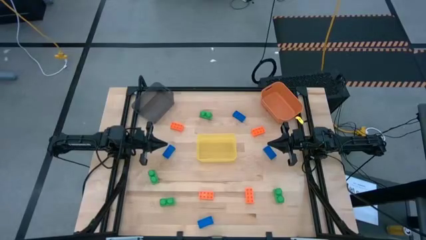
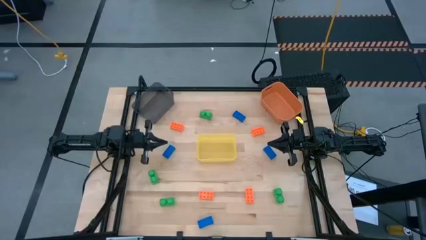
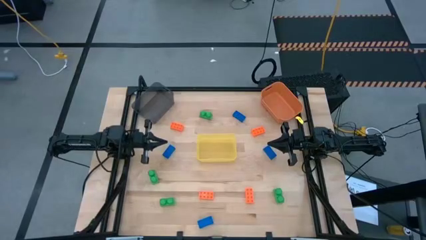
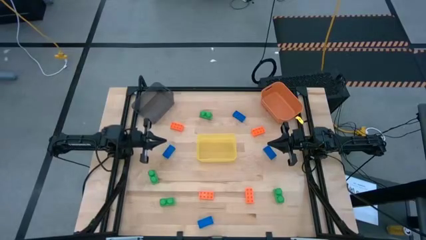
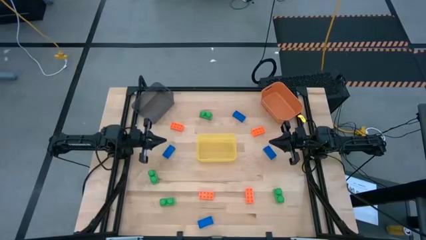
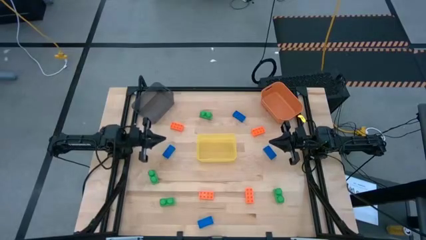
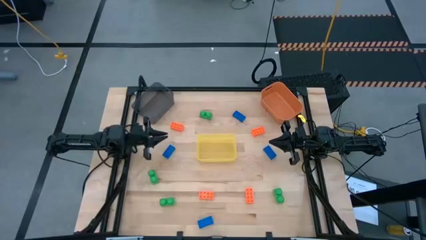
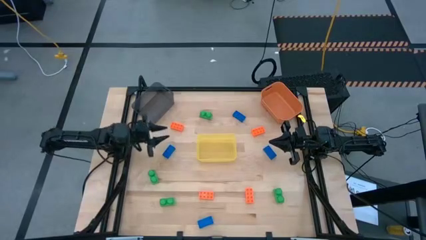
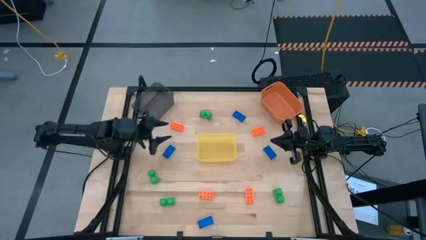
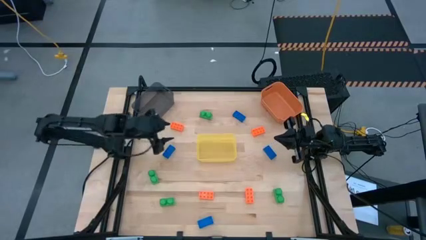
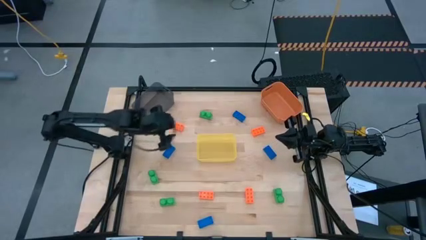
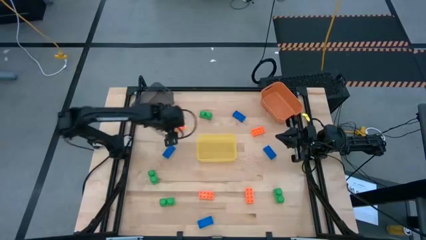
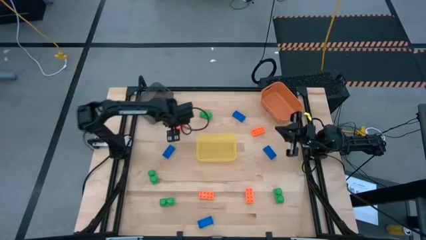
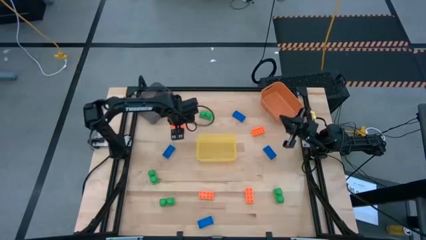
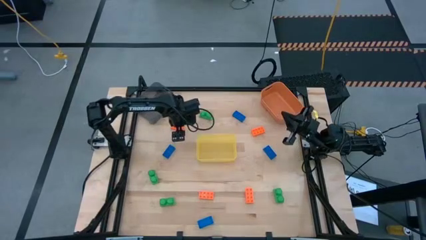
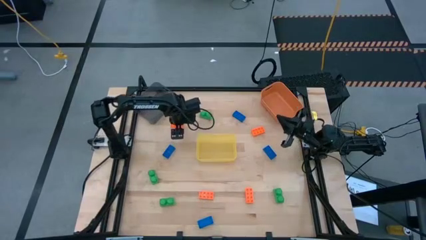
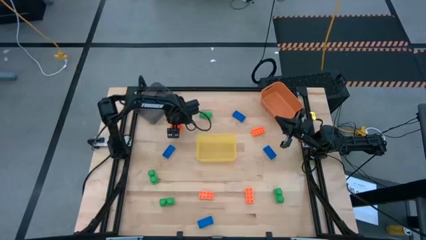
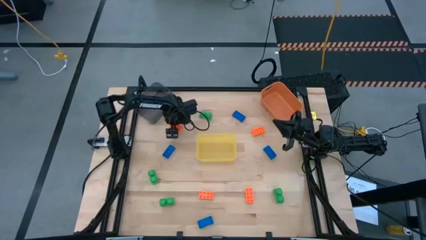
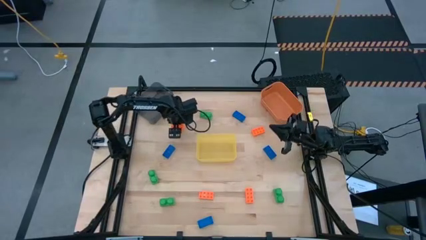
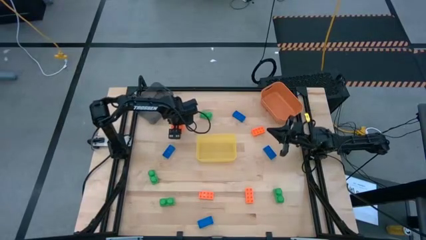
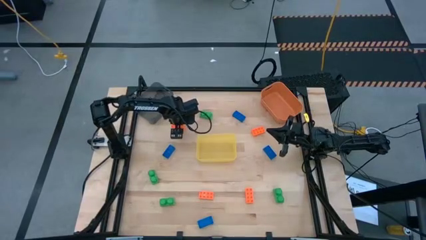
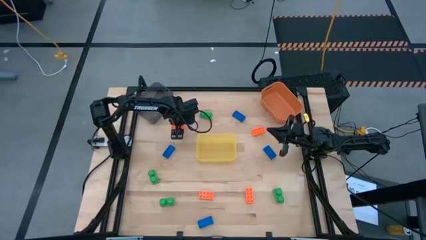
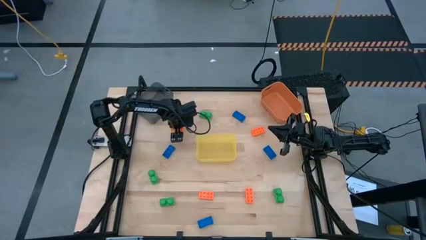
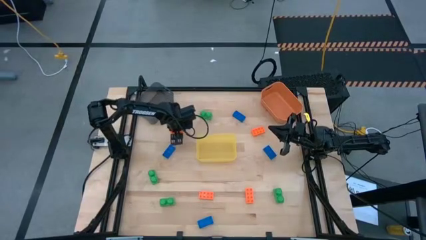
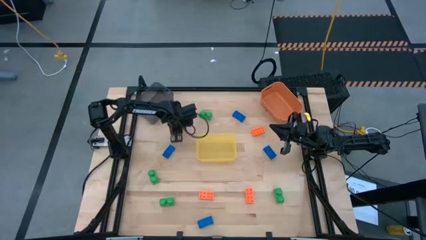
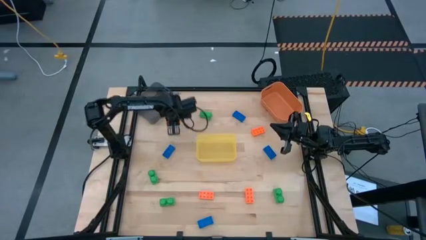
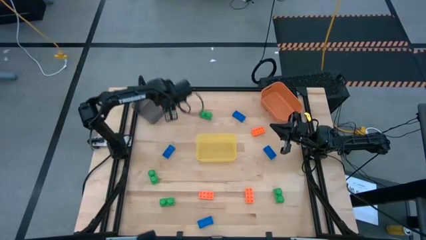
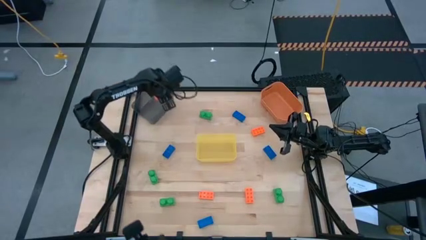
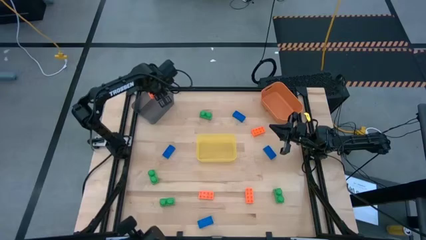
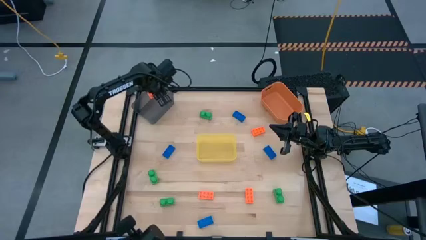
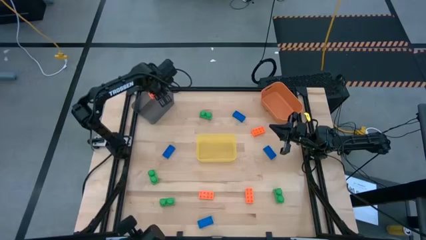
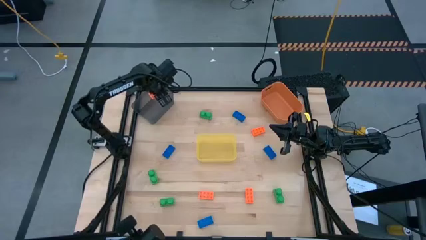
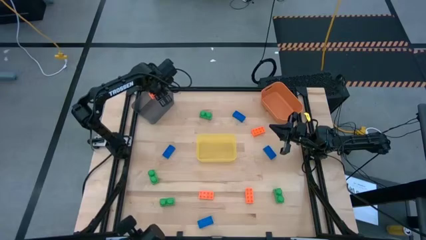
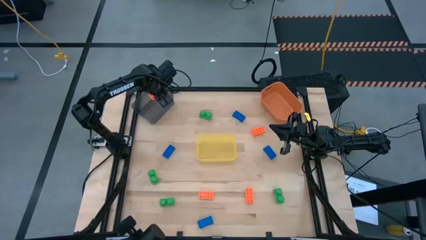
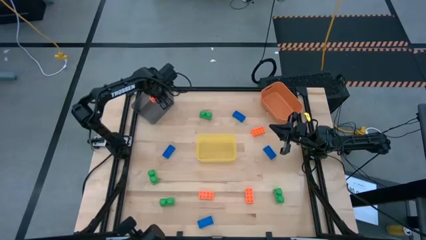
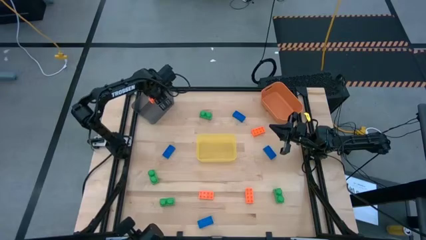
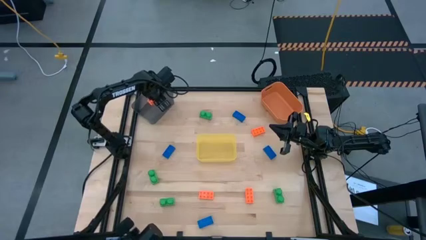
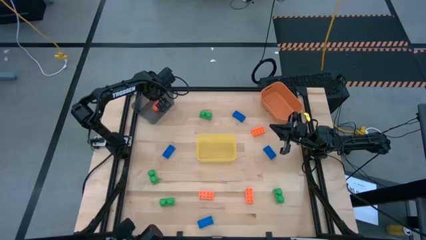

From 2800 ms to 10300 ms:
Task: Sort & place blocks by color
Put the orange game piece into the black bin

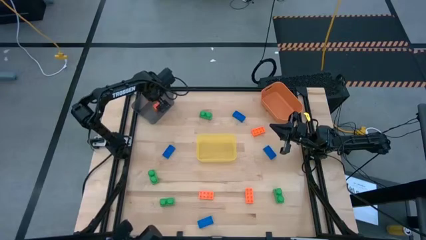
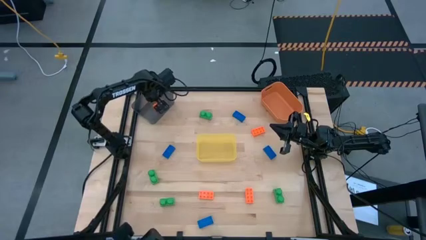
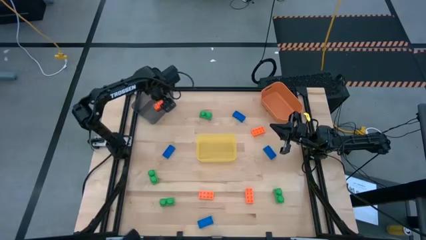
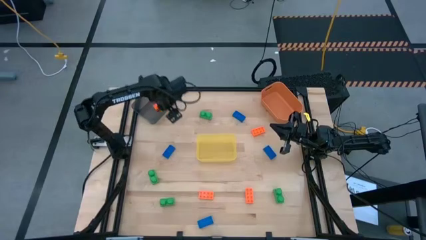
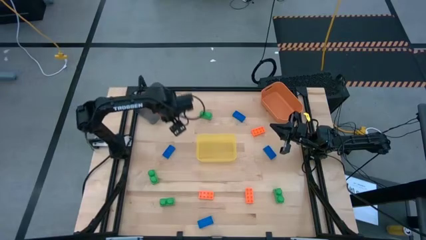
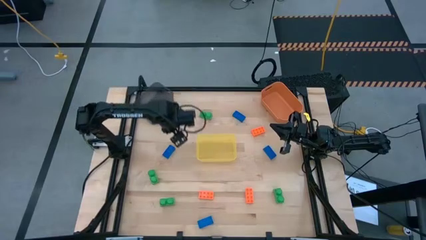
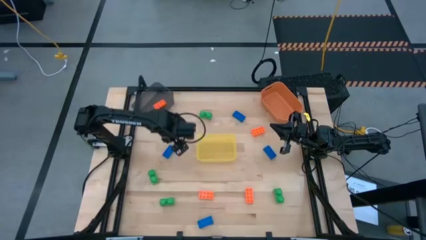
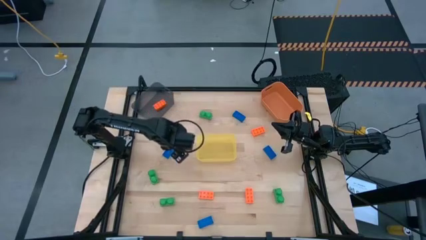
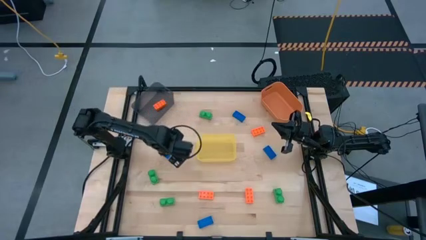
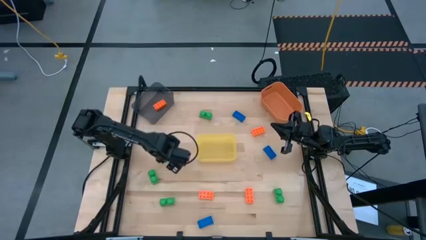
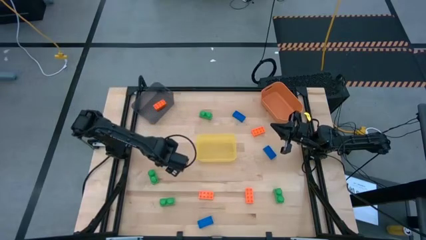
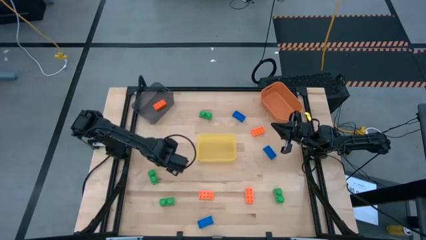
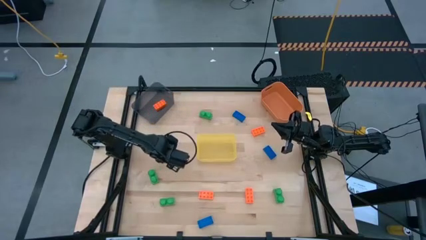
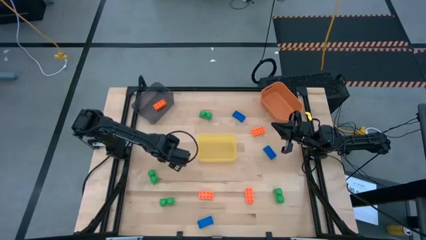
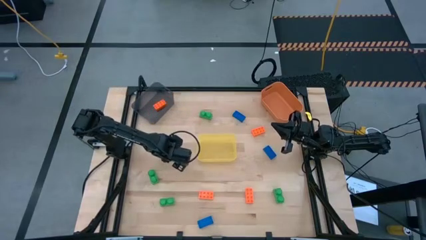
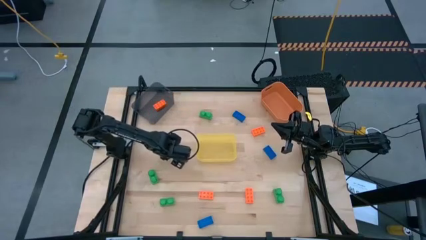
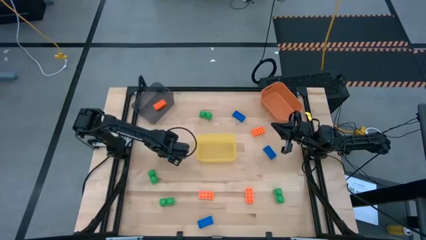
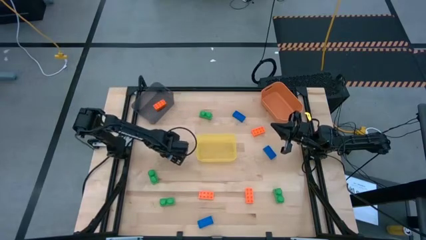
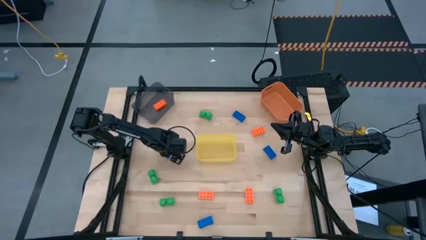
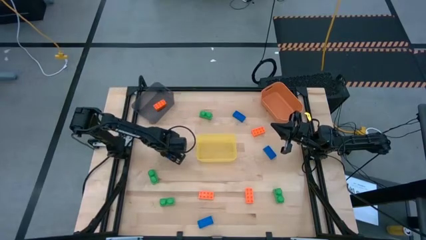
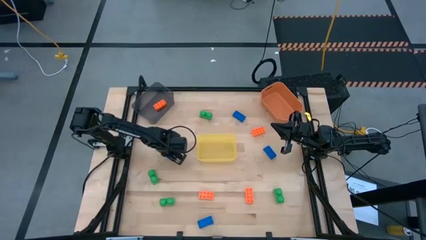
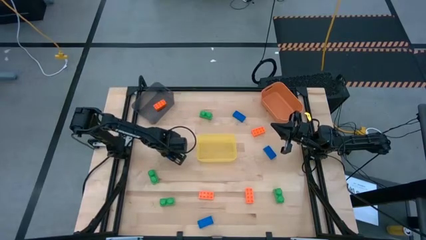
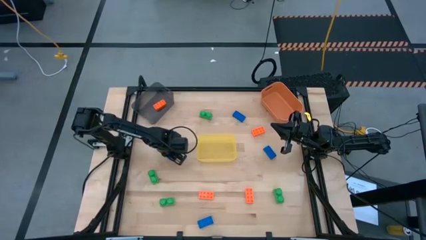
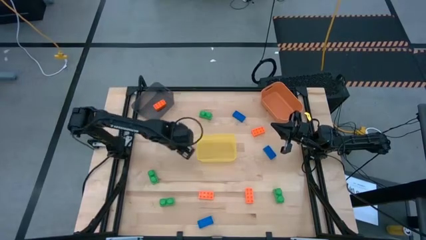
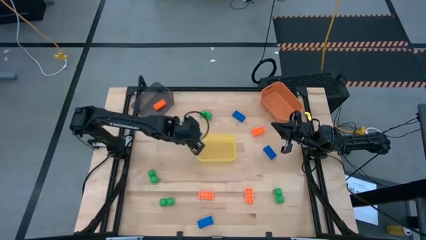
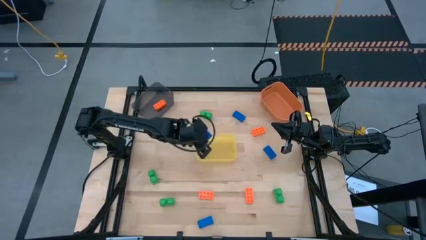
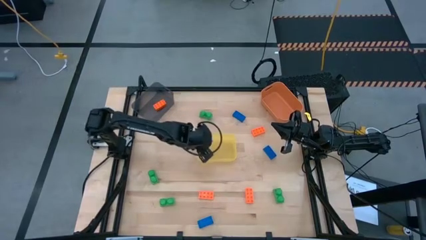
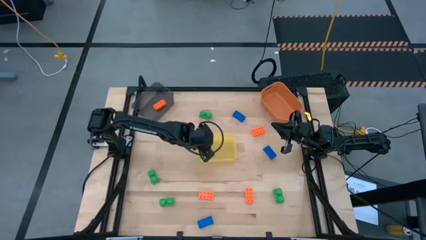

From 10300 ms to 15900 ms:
Put the blue game piece into the yellow bin

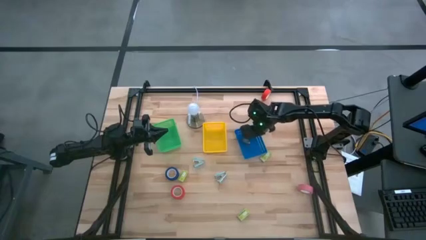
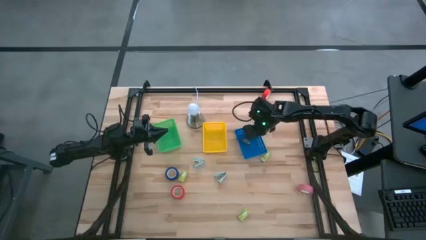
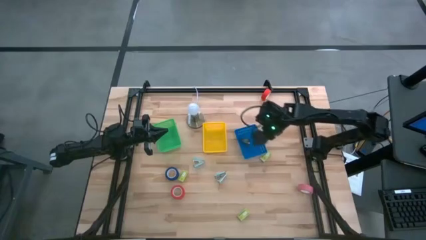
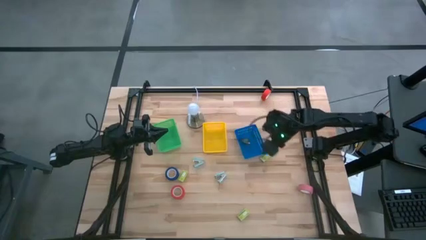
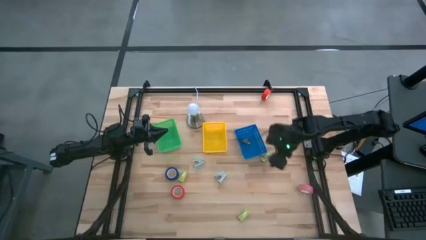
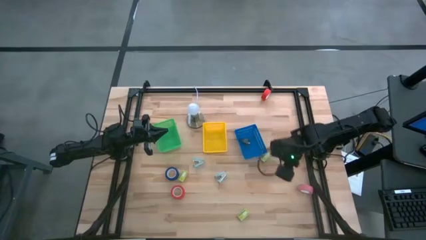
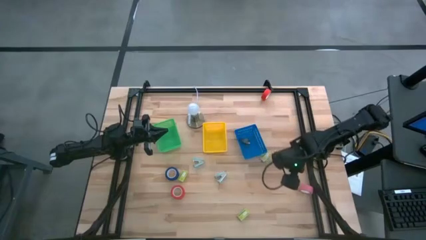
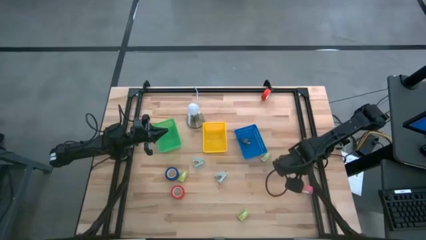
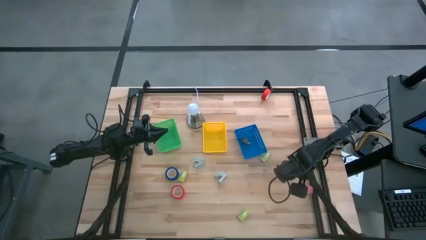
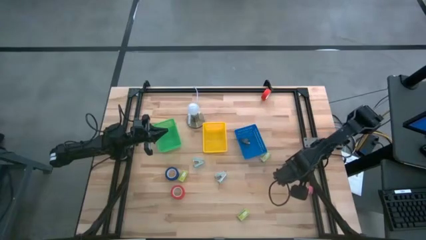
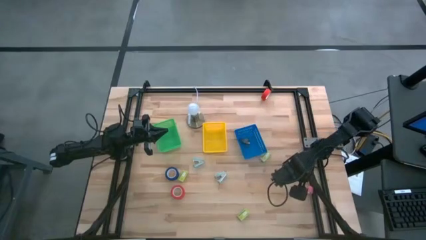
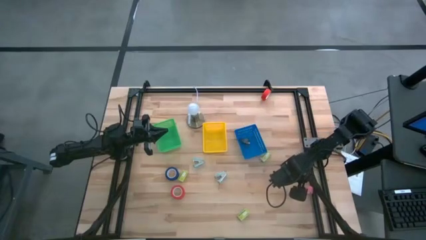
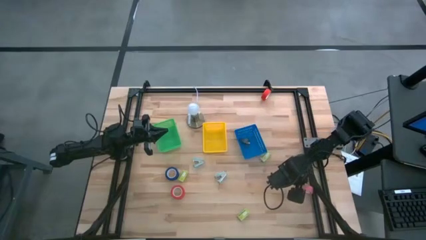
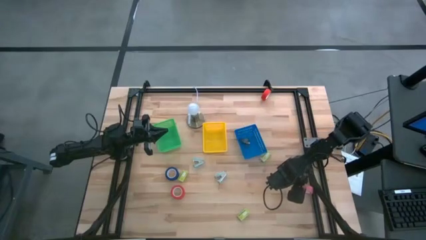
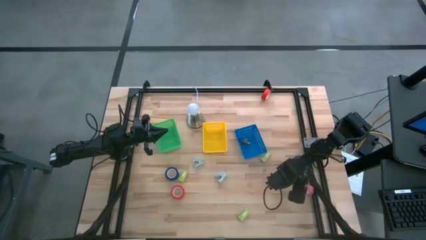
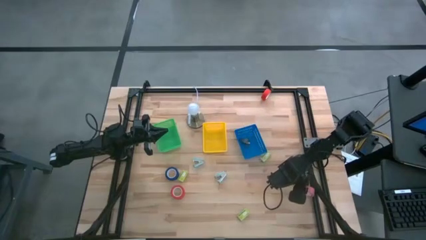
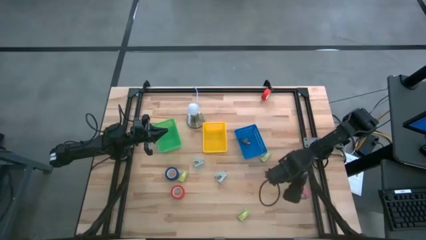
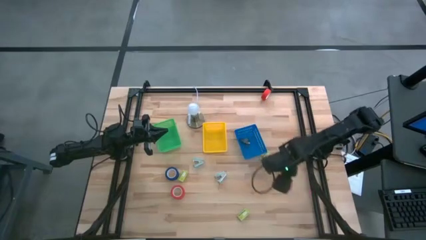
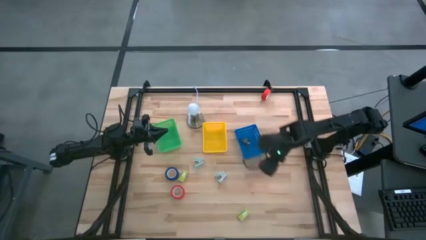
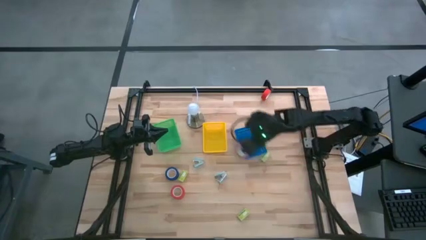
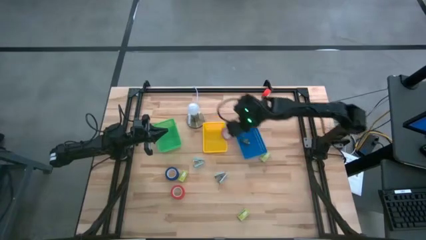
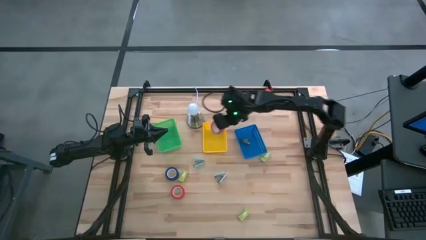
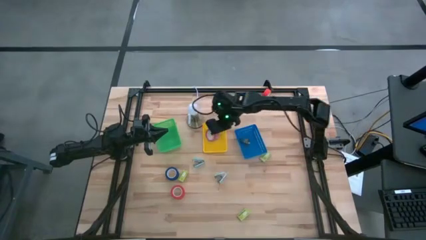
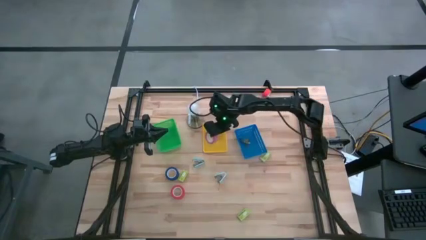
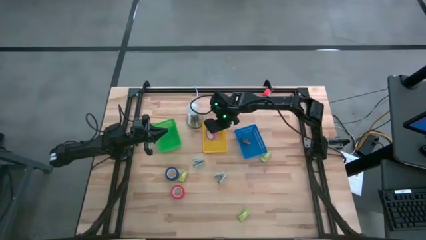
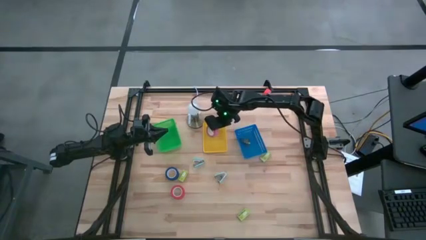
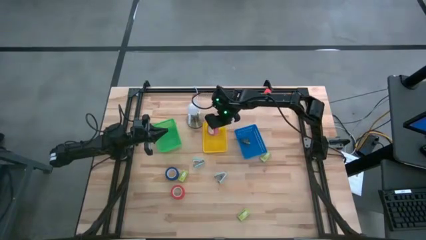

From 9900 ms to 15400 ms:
Task: Pick and place Stapler, Stapler remover, tape
Put the pink tape into the yellow basket
